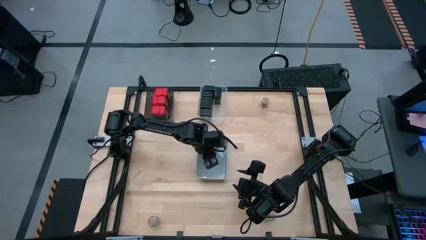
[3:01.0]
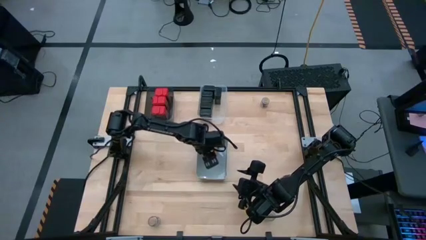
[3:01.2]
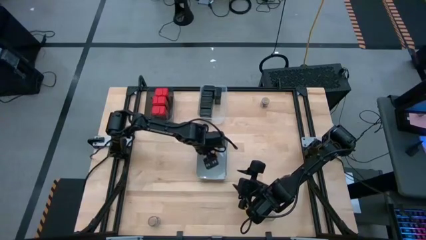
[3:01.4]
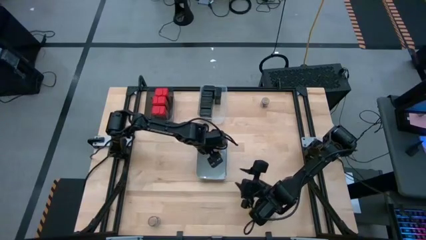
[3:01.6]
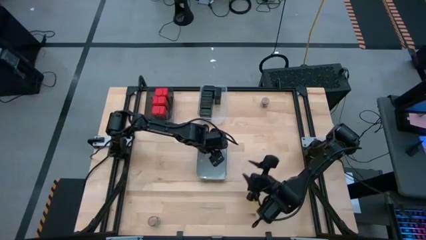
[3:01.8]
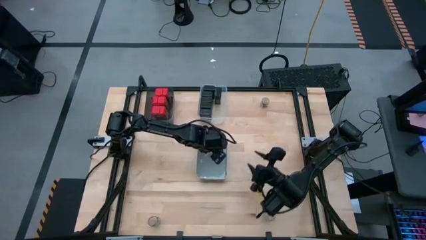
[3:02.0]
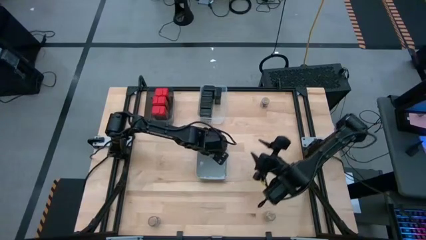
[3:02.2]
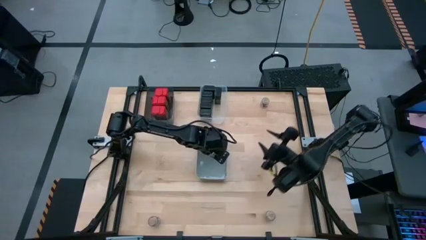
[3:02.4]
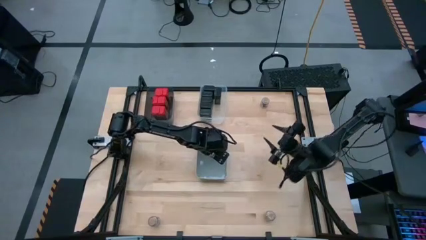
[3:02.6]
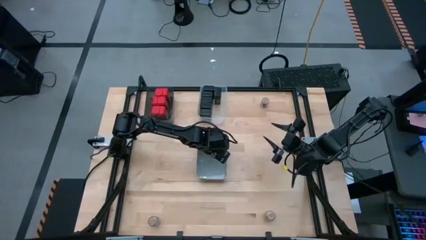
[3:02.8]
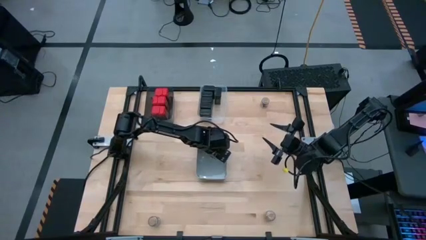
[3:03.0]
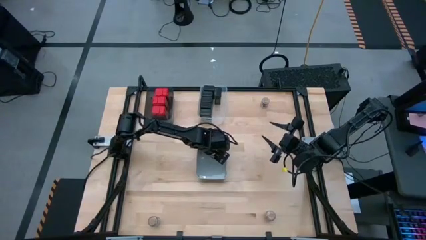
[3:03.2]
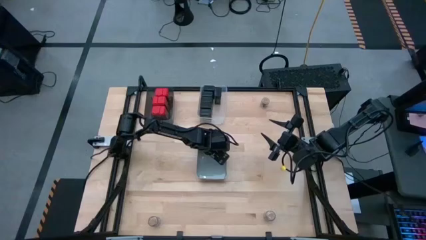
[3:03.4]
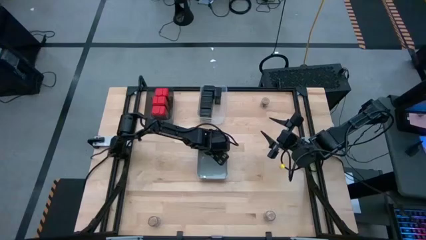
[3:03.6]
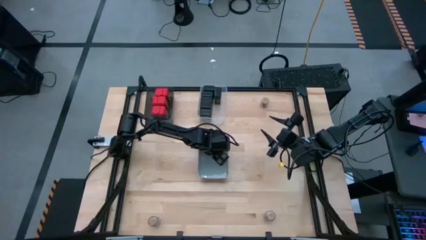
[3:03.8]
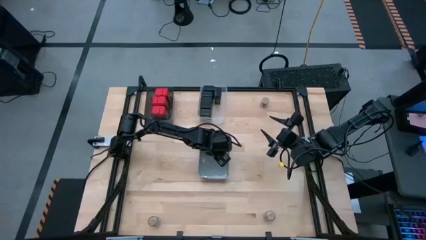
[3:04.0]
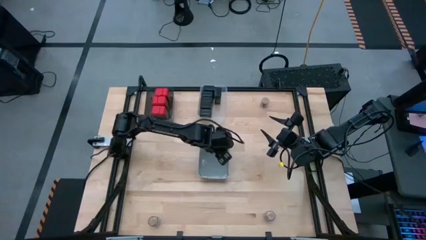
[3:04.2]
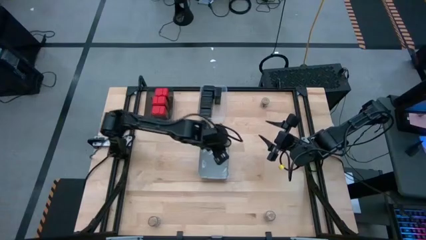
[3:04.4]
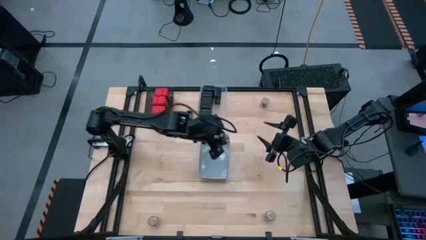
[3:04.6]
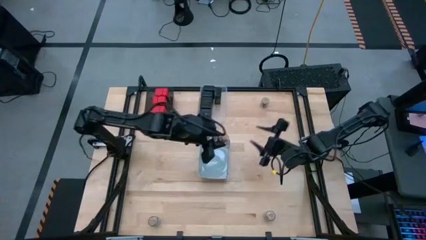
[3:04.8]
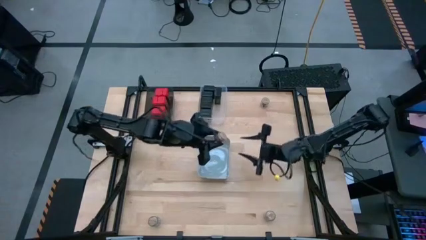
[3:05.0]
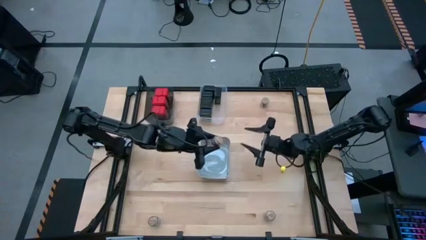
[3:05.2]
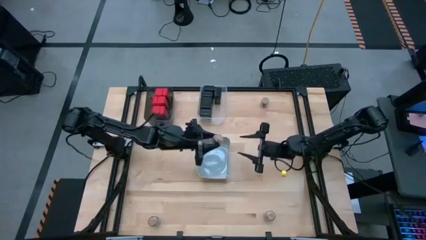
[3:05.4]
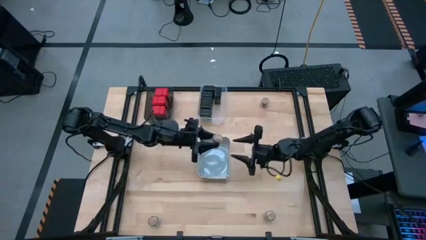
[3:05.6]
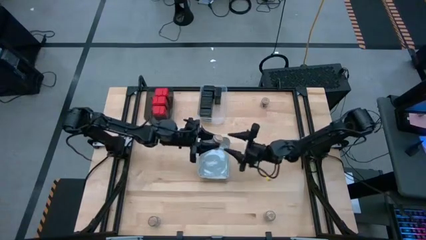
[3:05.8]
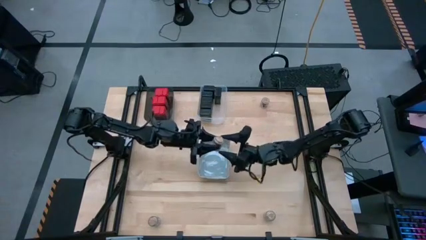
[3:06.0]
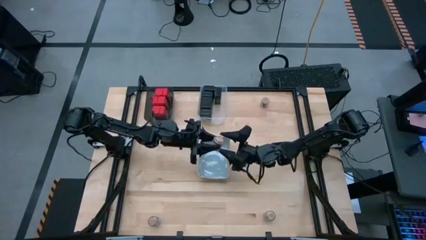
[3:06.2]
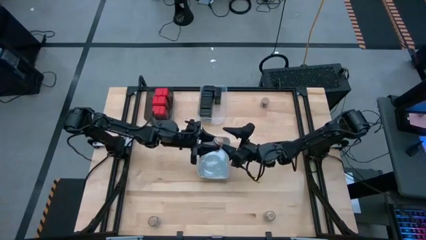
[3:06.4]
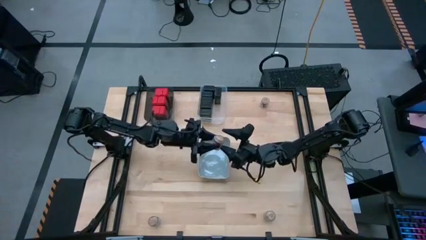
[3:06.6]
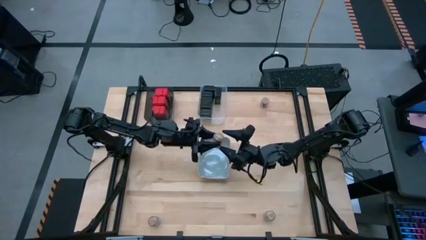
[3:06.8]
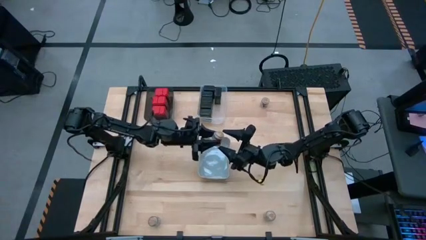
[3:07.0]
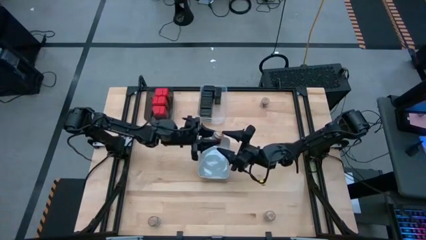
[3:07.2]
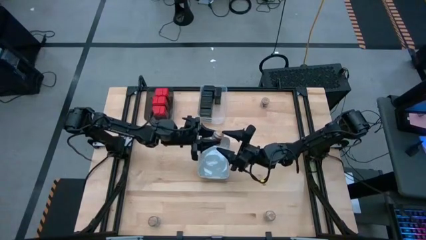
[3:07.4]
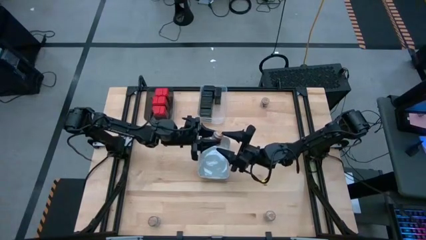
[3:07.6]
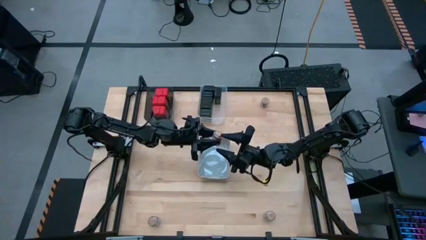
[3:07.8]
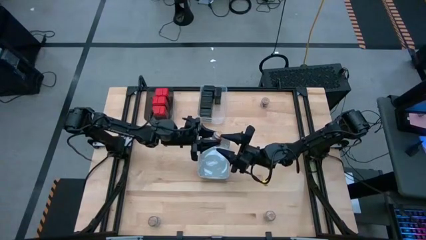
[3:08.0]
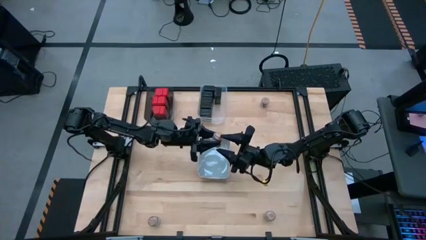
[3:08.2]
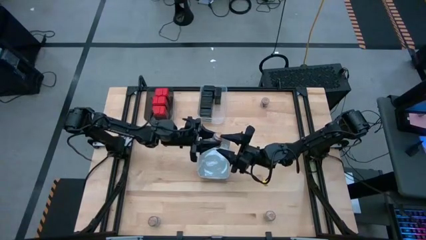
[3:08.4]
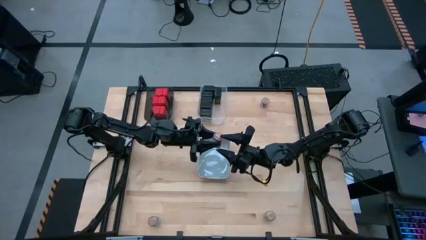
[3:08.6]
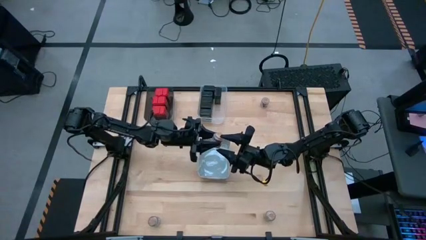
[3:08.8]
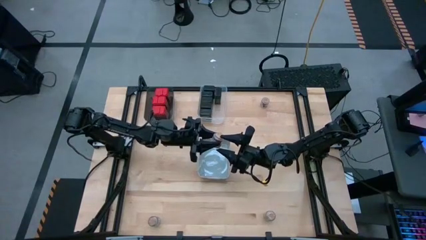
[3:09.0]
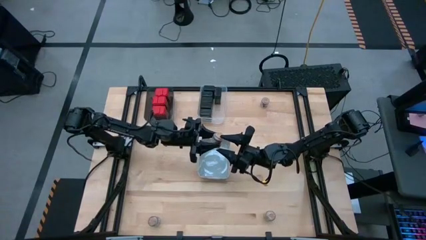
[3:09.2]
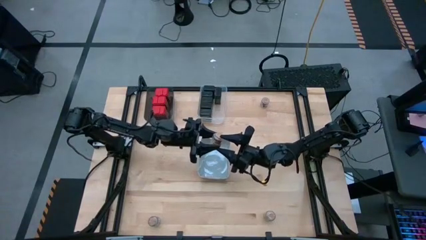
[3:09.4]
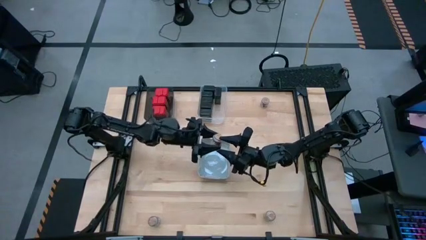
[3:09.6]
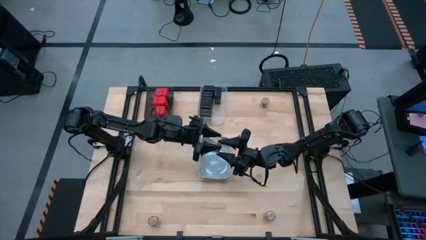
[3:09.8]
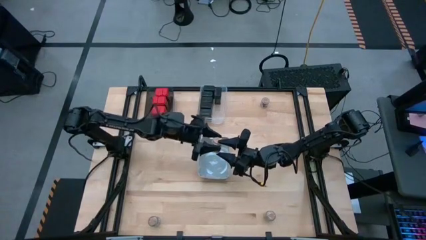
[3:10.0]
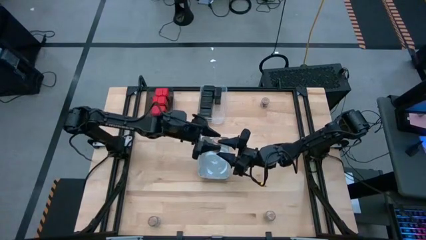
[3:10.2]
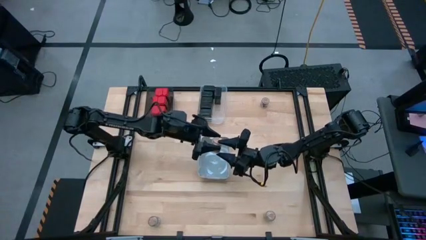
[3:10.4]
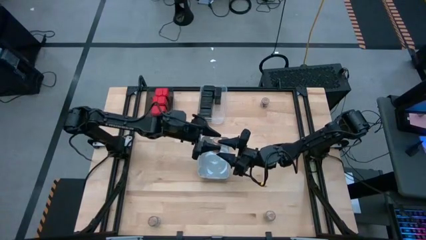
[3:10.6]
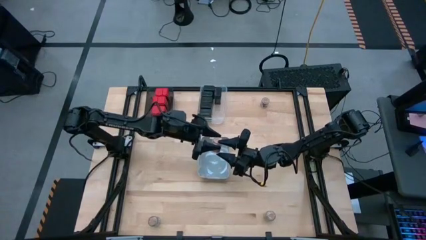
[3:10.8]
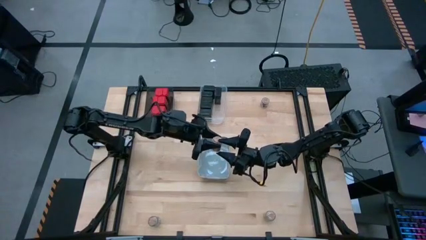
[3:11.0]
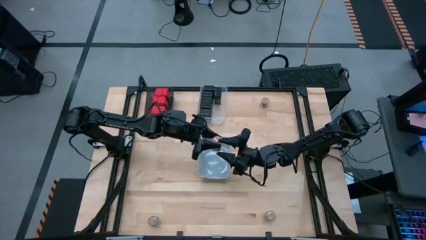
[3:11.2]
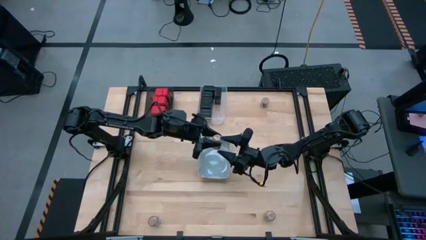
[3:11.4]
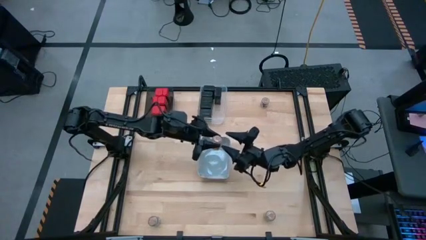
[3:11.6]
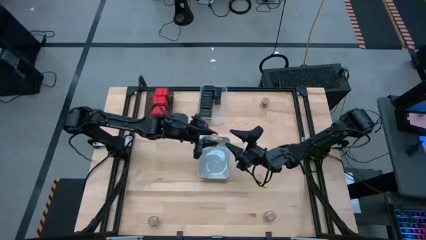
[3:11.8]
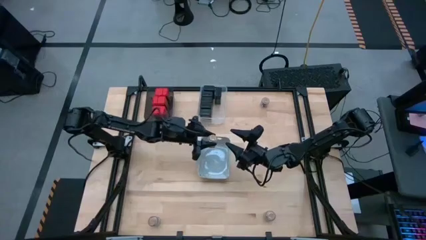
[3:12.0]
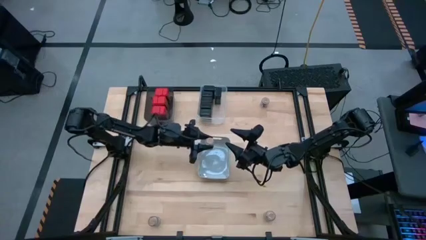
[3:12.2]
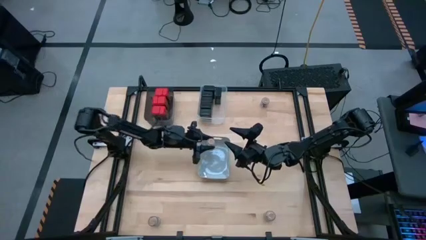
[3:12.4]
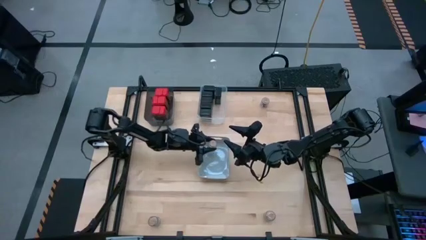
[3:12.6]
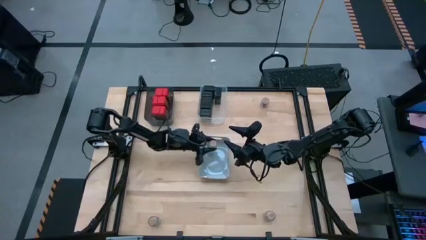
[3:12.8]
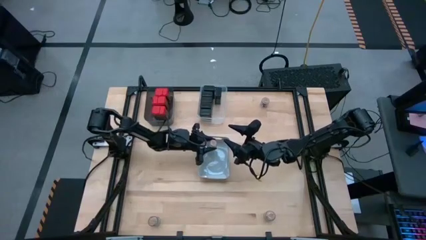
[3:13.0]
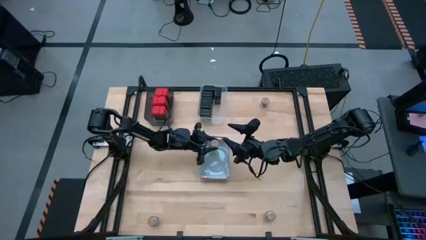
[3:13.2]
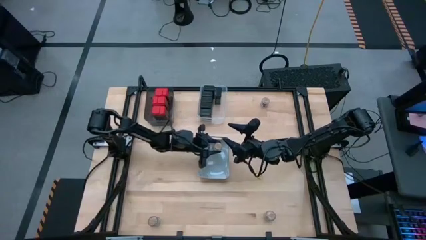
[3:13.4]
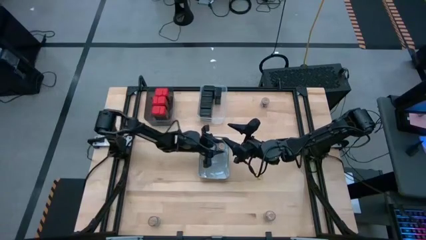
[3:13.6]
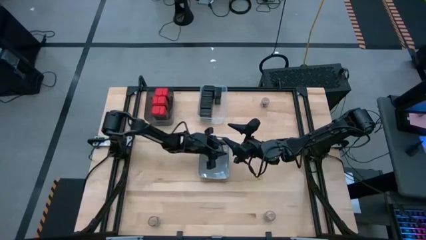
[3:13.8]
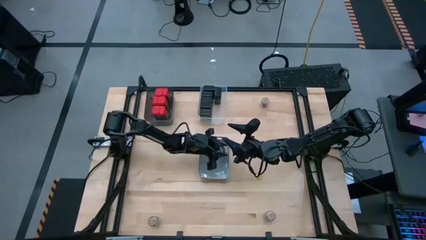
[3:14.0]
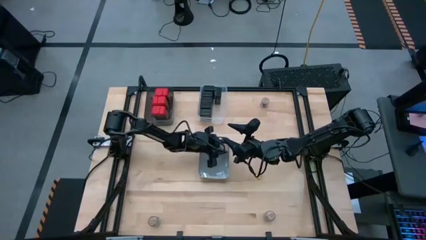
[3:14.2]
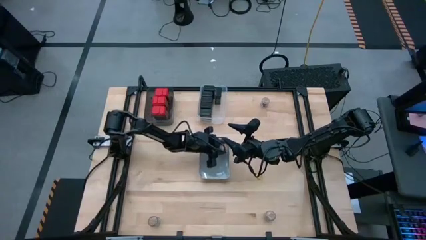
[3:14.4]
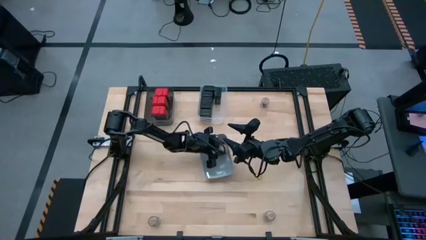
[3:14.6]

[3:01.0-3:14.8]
Task: Sort spices by type
Put the brown seasoning bottle into the gray bin

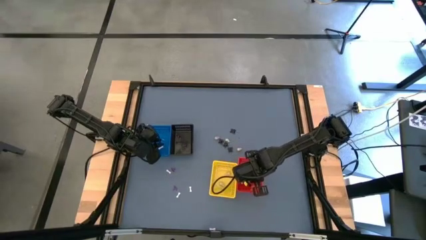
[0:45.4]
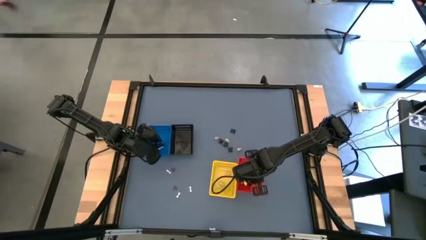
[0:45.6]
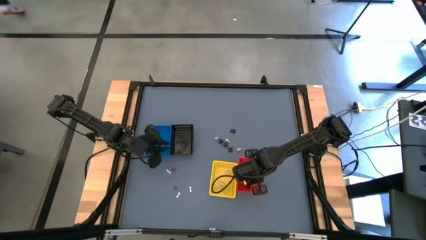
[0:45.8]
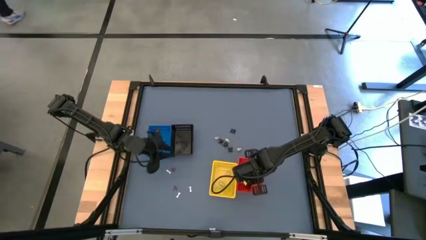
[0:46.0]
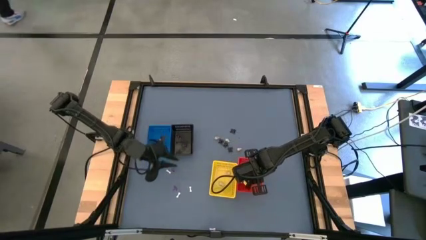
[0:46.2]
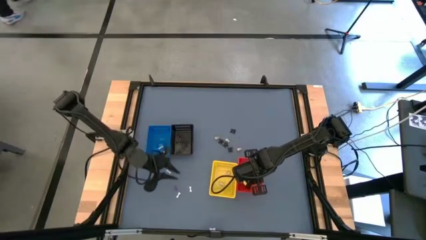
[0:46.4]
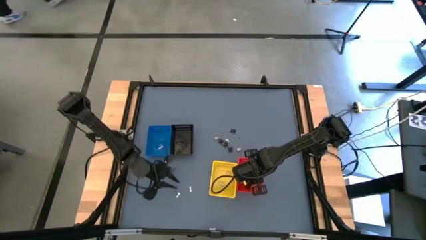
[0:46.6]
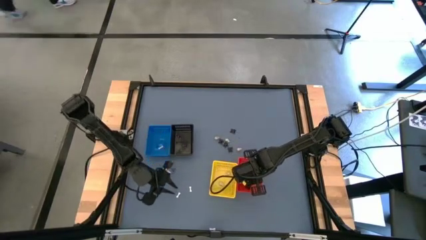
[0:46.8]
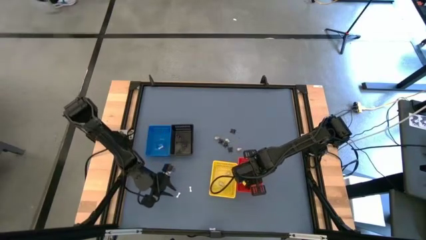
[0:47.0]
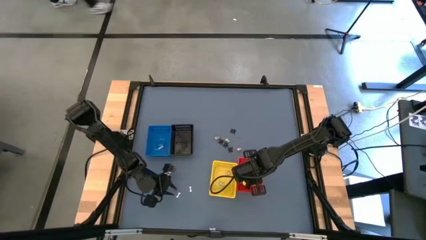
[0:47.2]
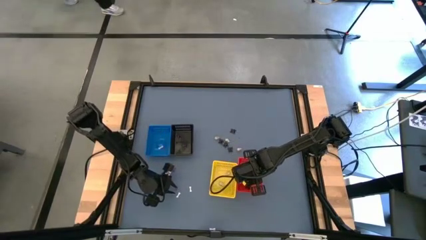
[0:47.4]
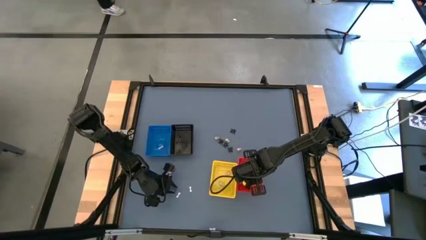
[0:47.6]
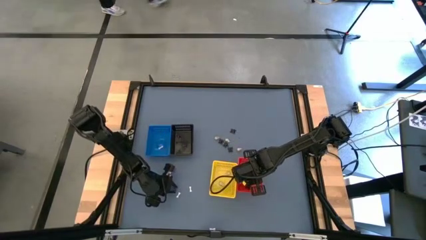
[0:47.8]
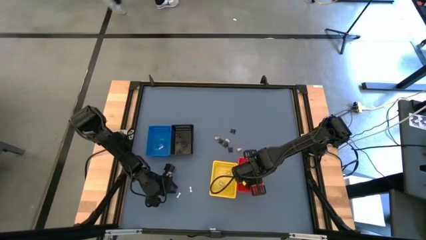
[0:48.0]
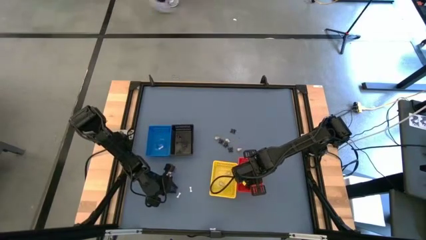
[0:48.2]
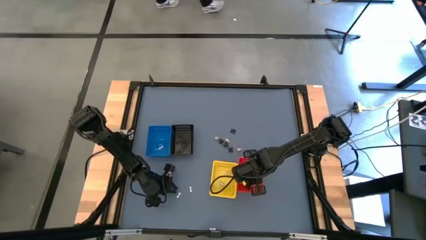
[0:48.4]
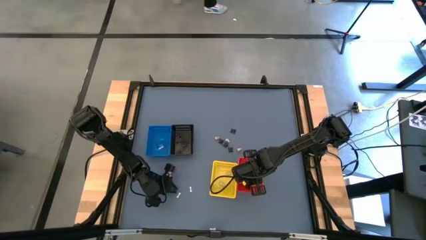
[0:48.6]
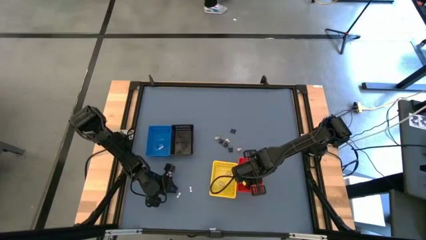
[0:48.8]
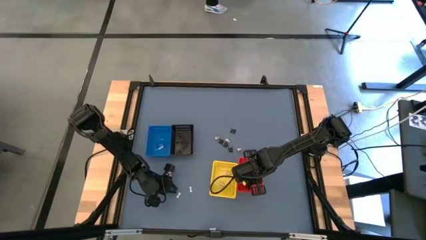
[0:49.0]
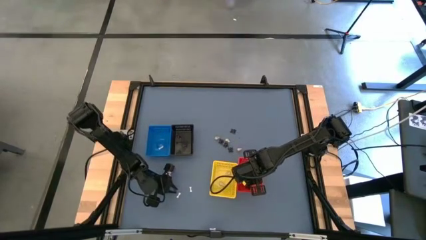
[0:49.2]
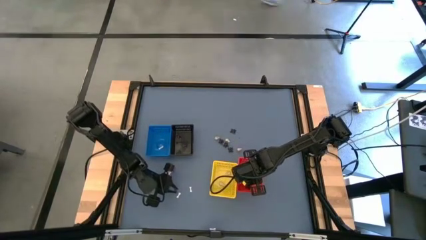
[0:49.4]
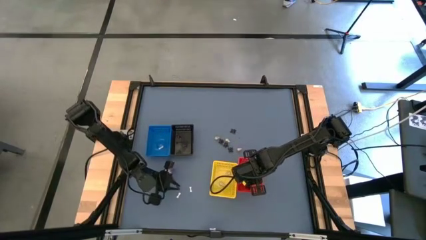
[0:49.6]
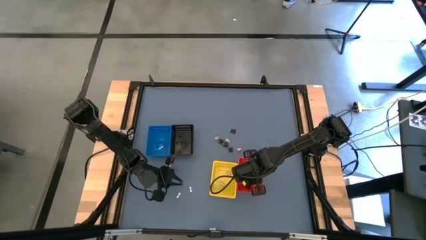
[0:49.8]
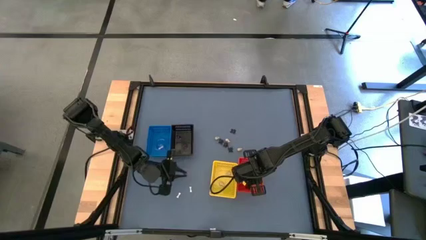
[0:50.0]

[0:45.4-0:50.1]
Task: Sort Halloween decoration
Put the witch hat toy into the black bin
